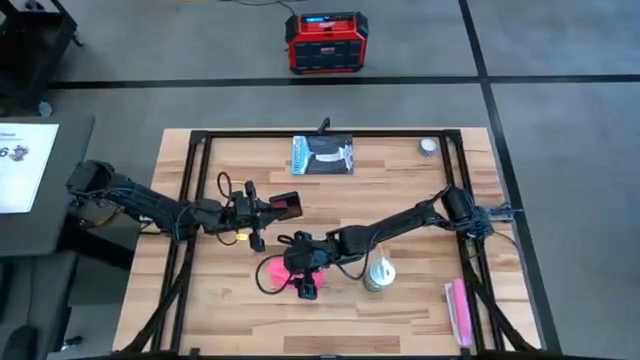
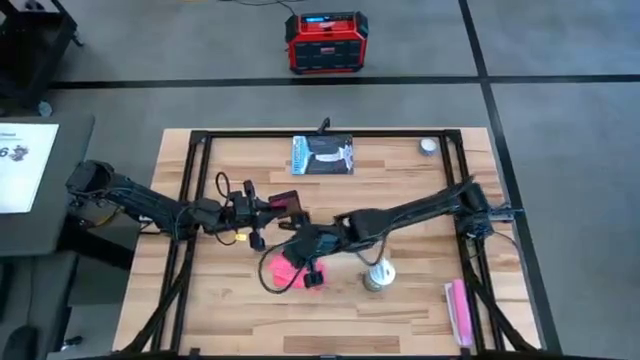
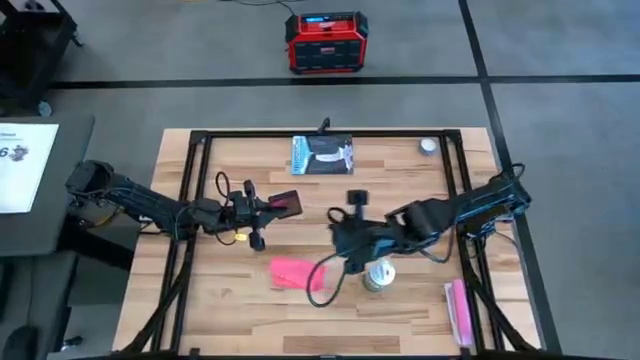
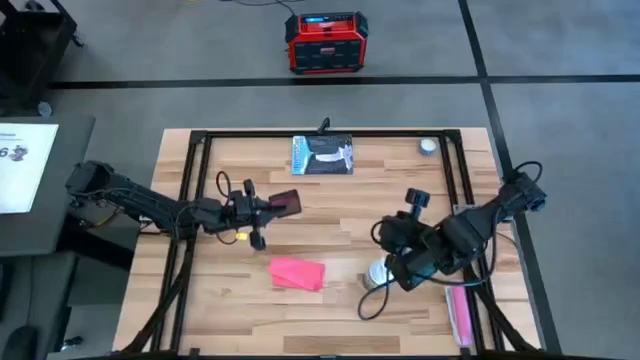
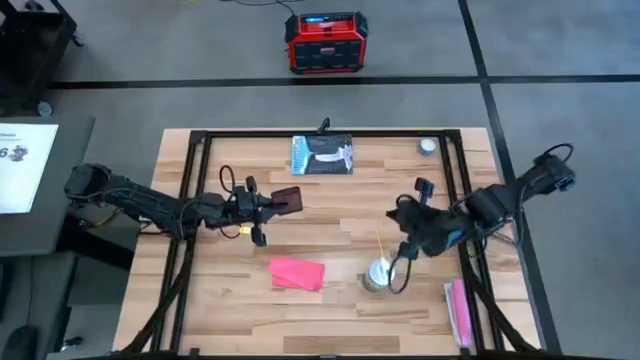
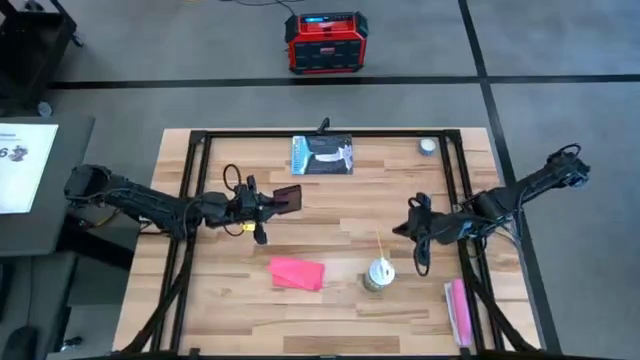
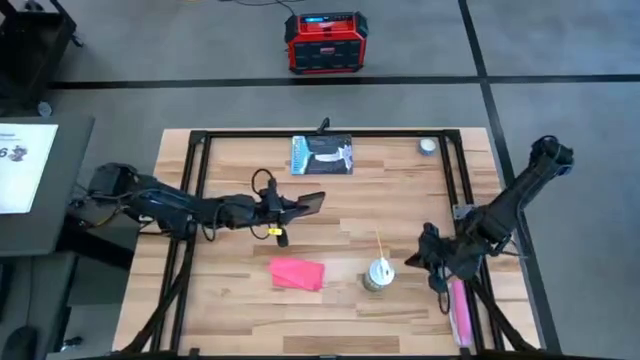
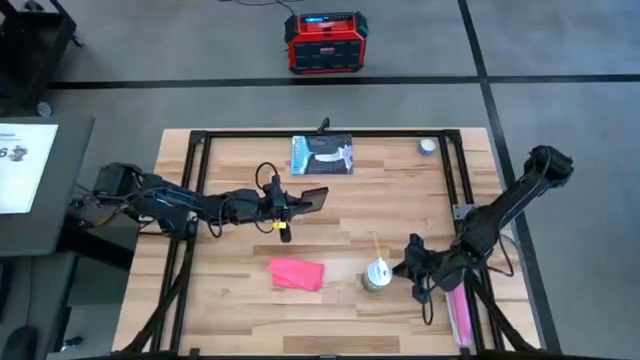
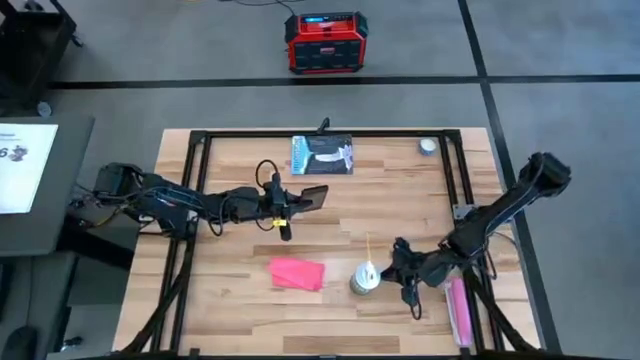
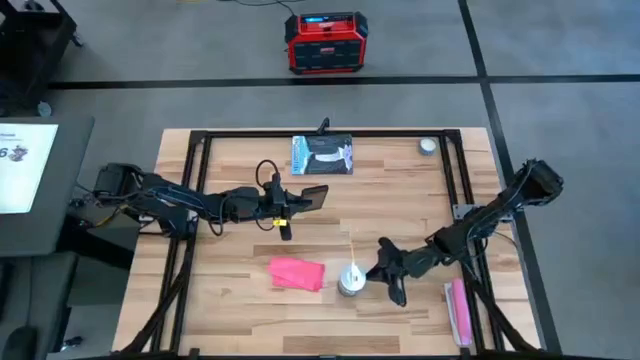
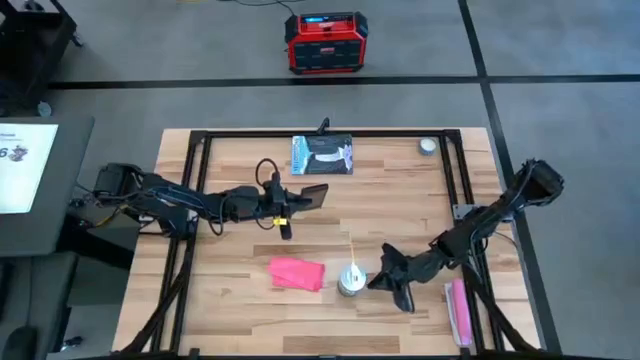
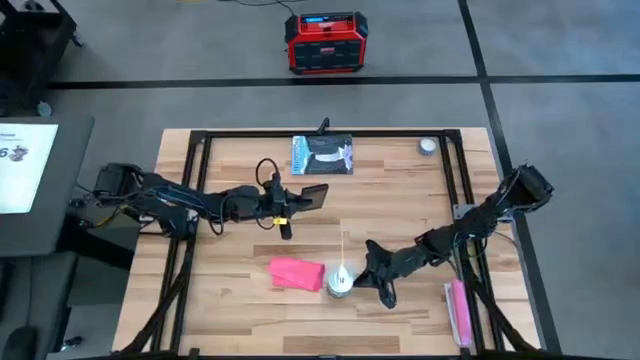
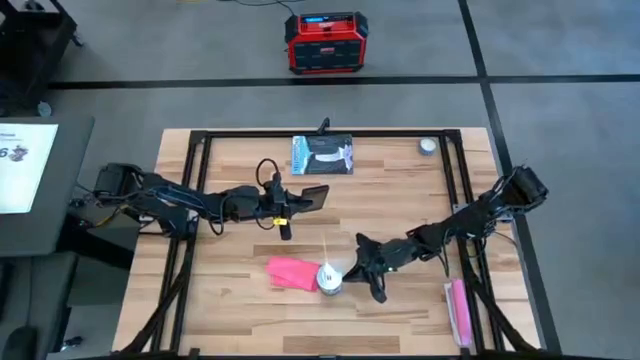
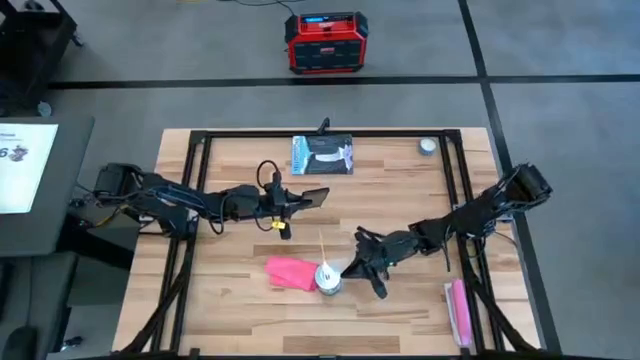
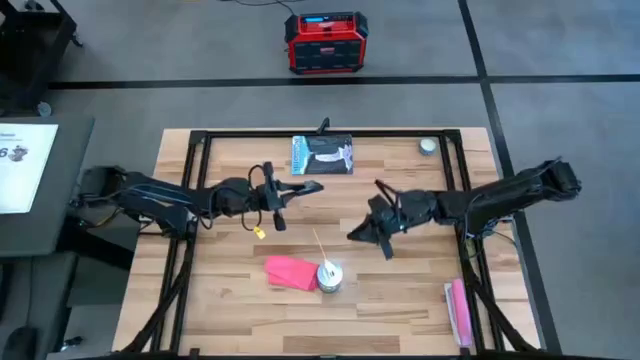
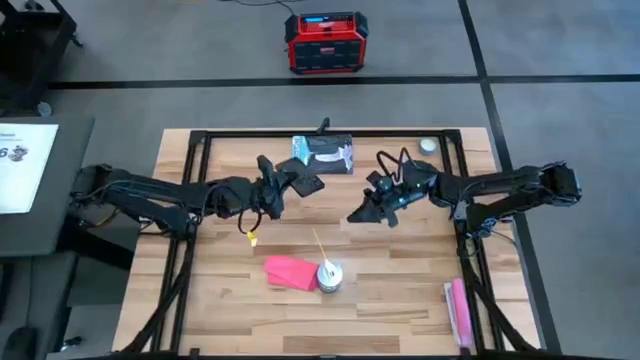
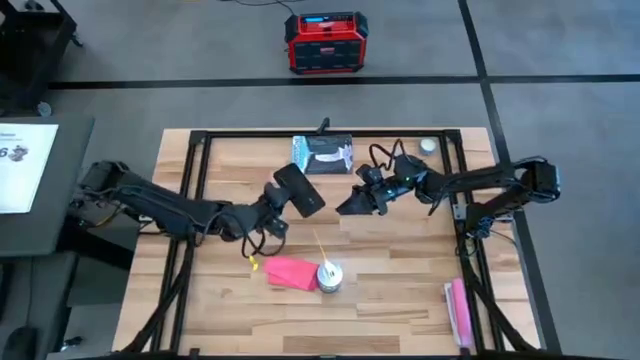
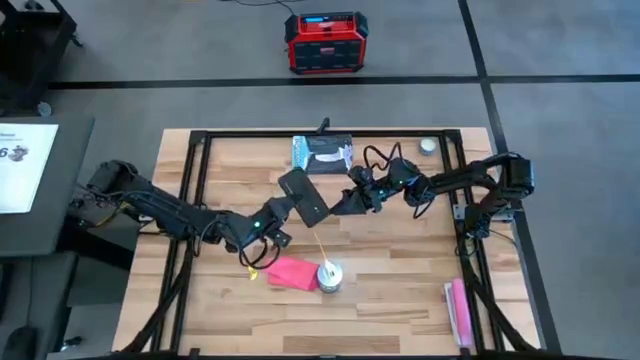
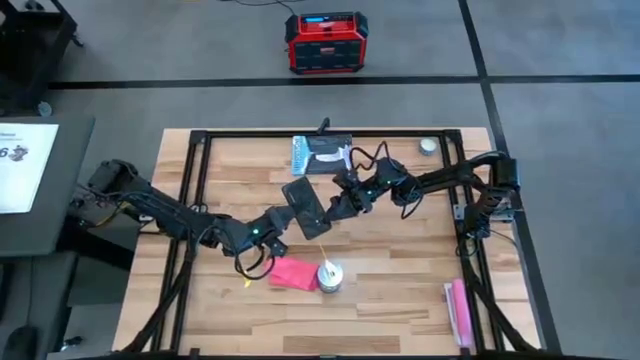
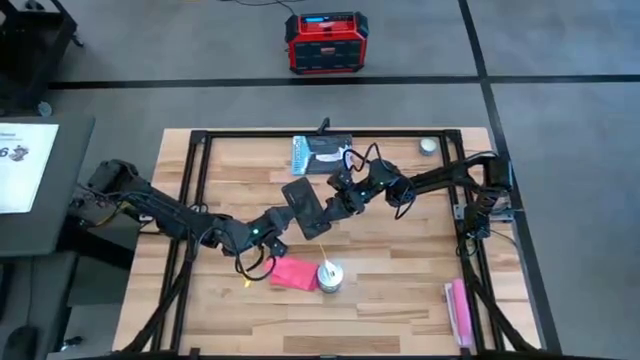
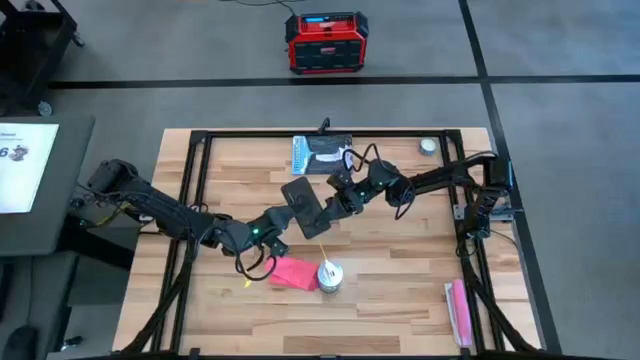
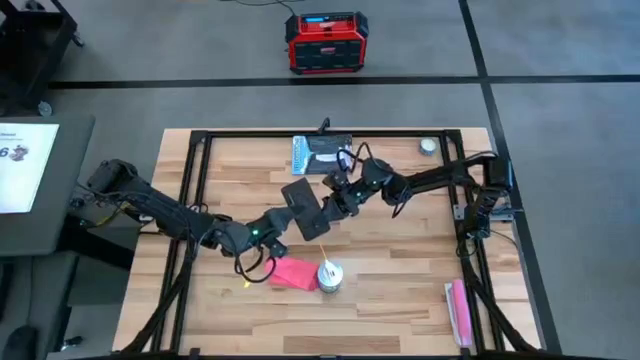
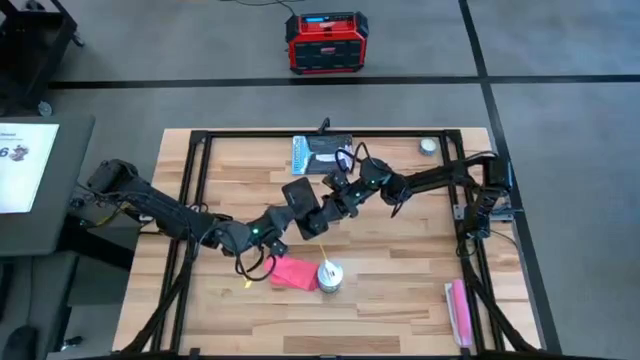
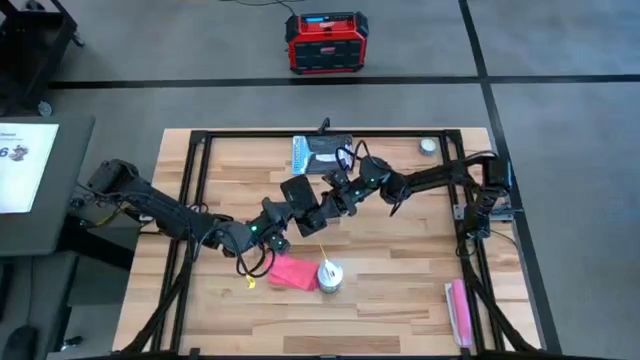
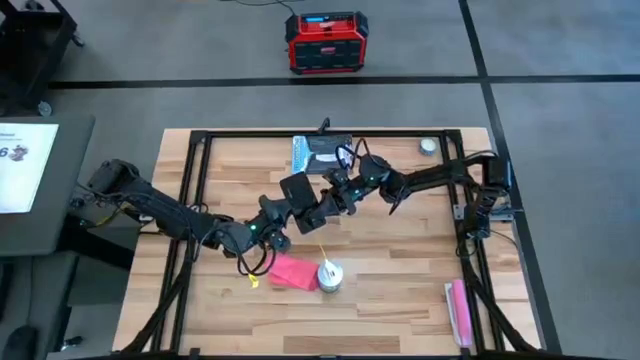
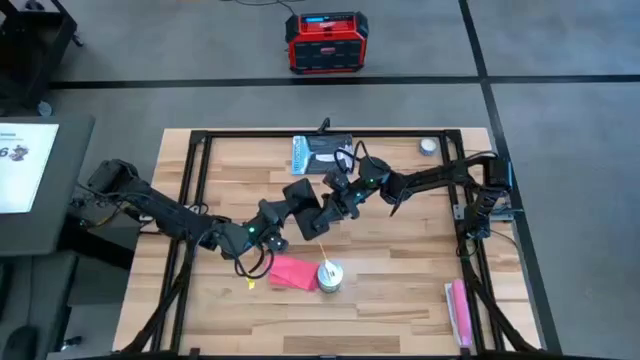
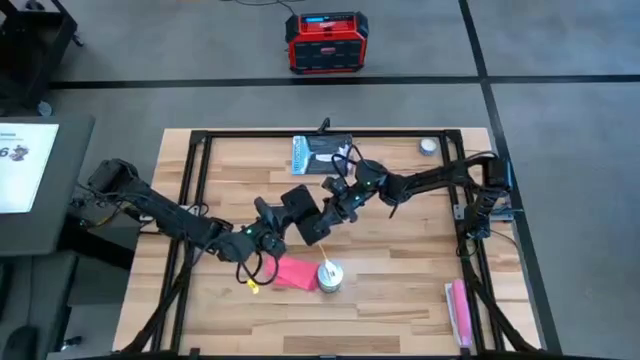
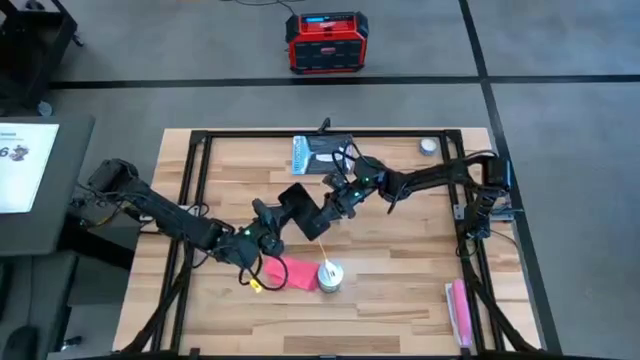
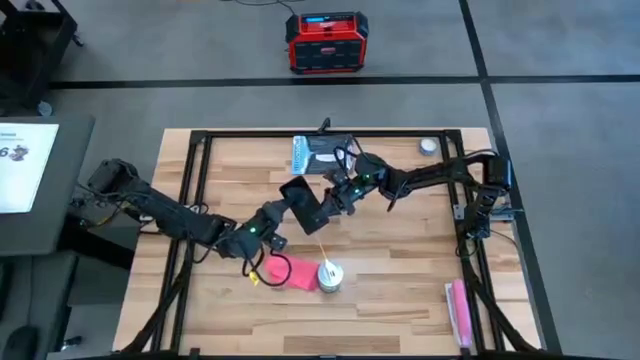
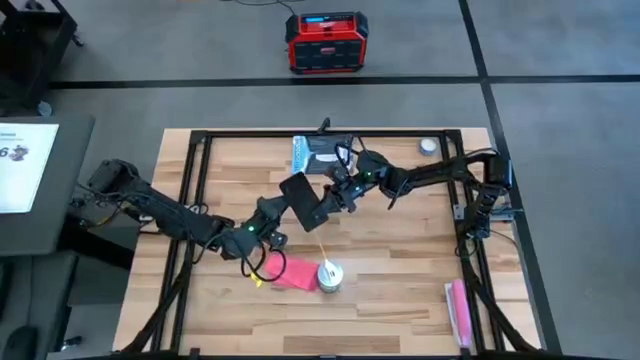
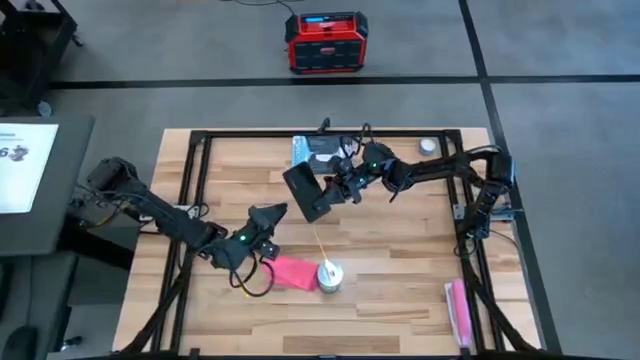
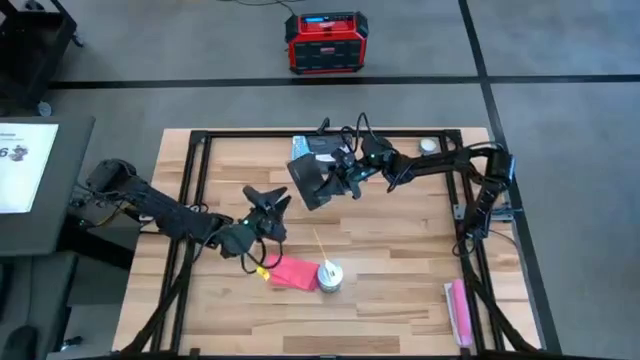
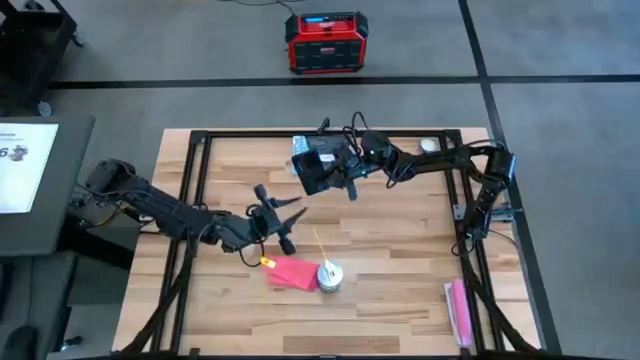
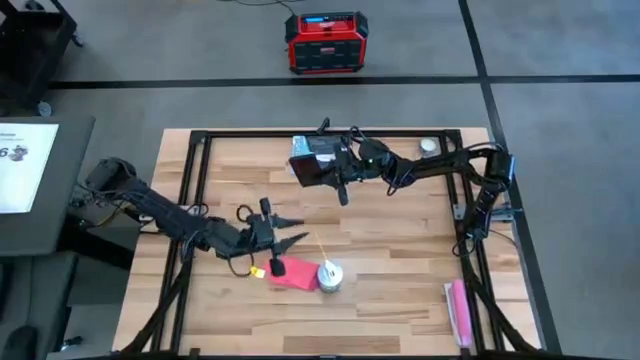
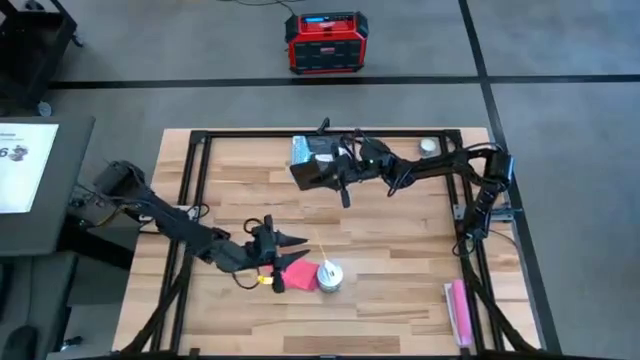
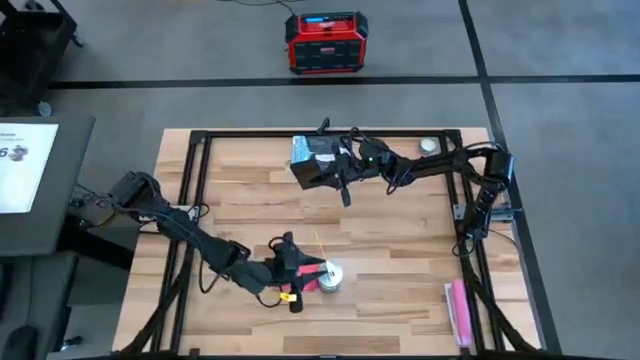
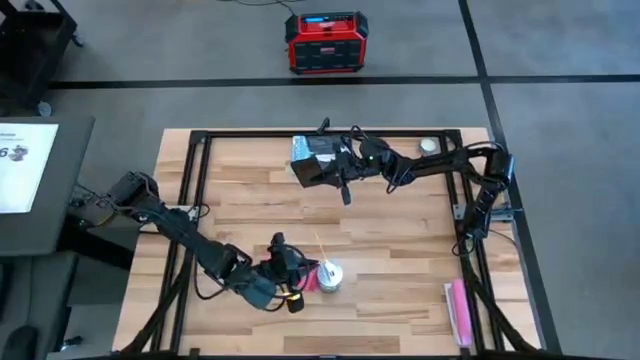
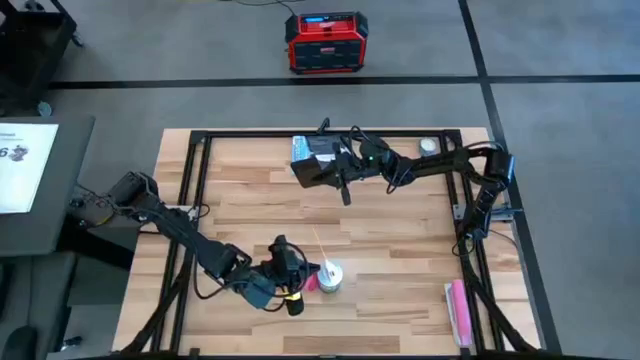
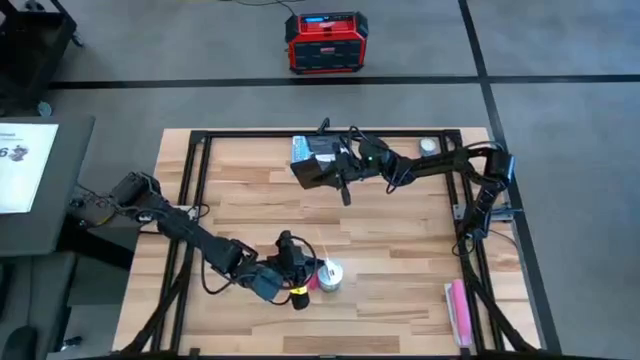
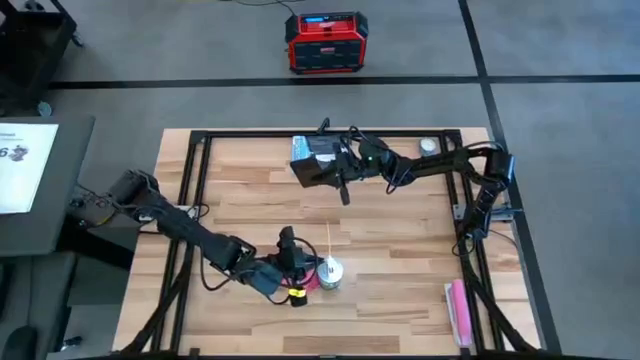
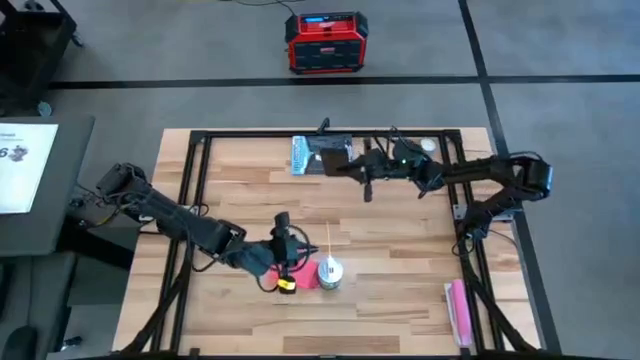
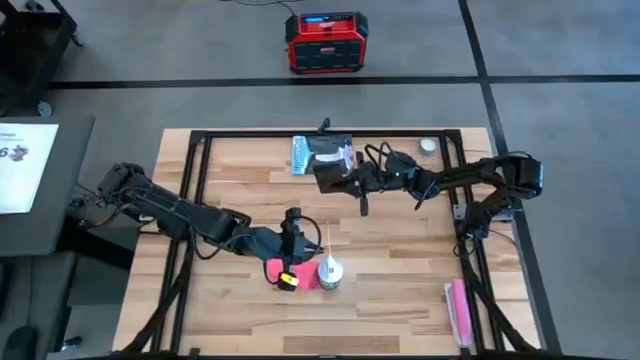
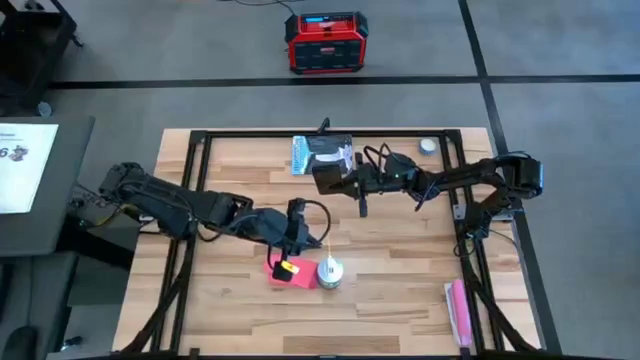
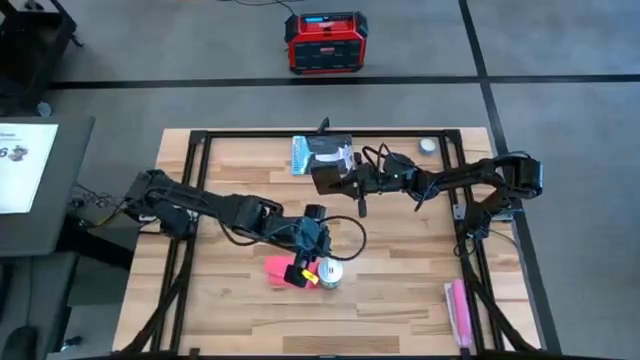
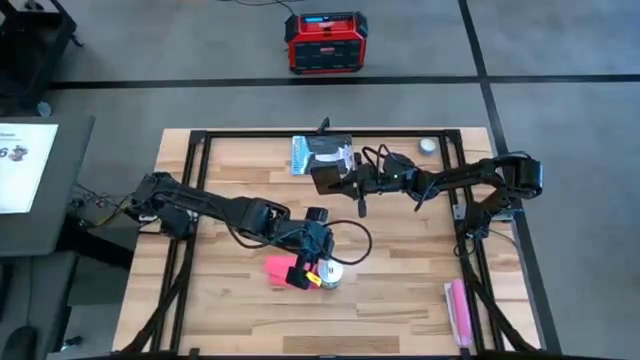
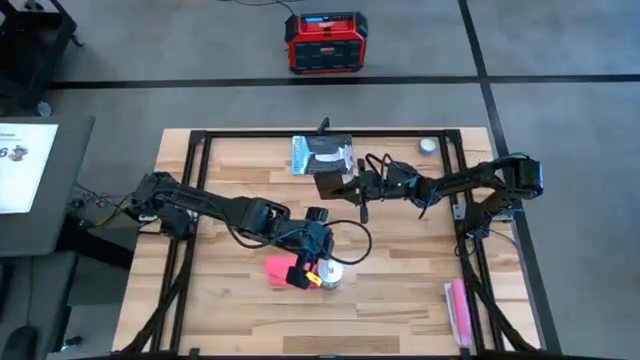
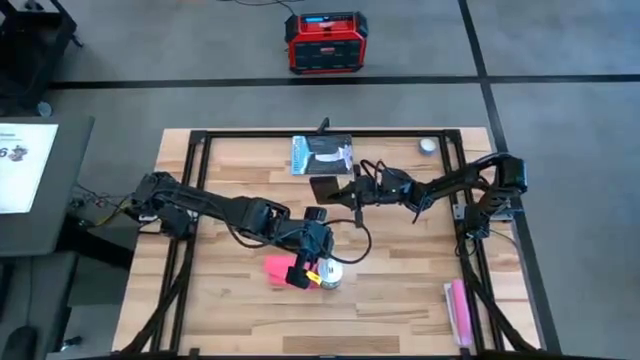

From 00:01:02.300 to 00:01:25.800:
Task: Apply microfiber cloth
Spray the back of the cellphone using the spray bottle
